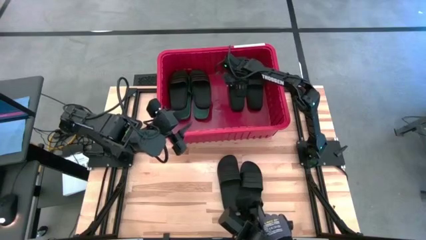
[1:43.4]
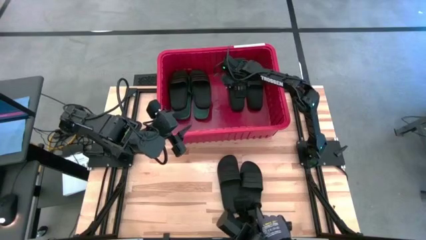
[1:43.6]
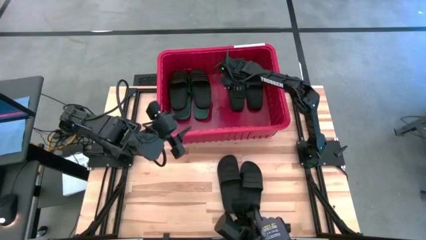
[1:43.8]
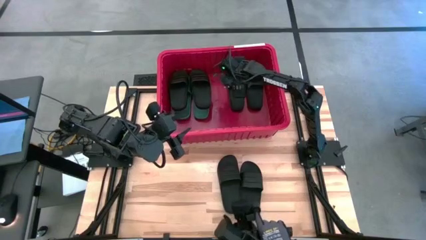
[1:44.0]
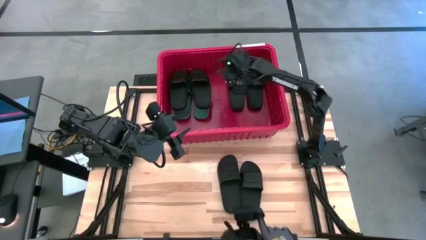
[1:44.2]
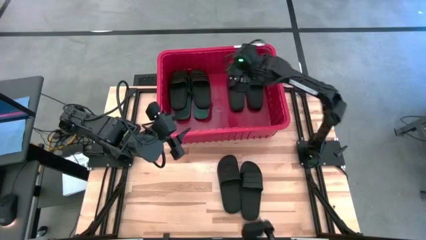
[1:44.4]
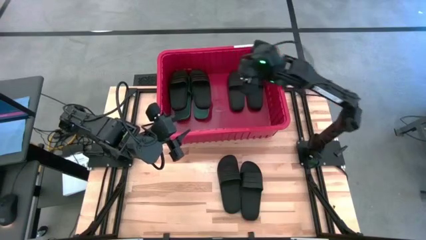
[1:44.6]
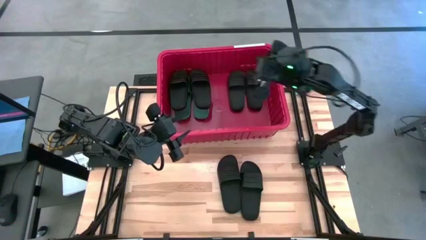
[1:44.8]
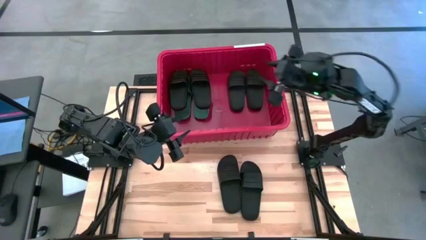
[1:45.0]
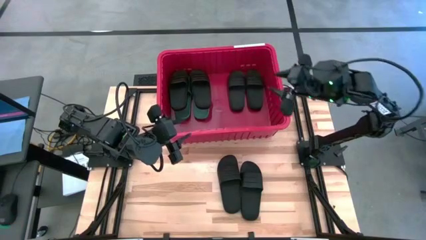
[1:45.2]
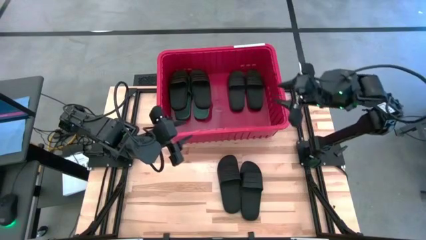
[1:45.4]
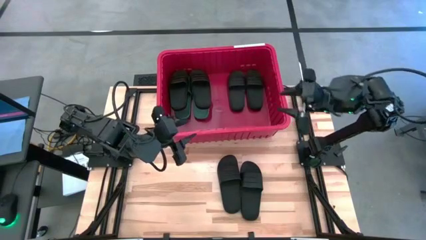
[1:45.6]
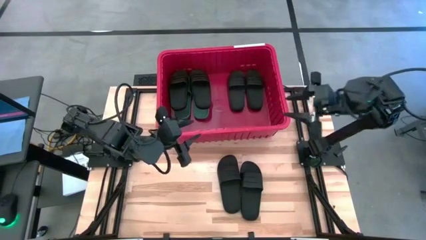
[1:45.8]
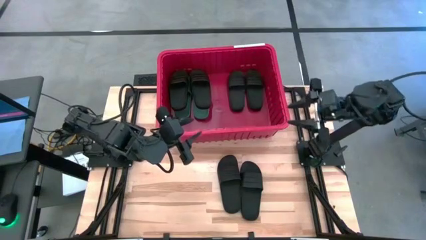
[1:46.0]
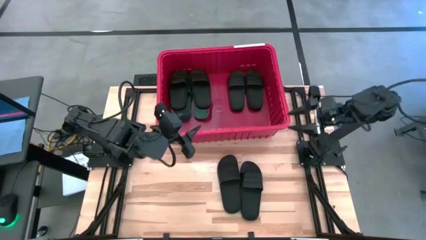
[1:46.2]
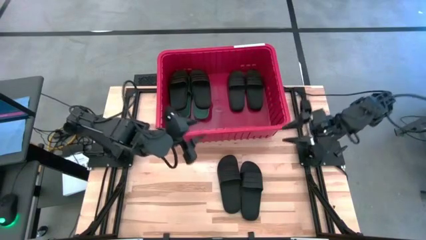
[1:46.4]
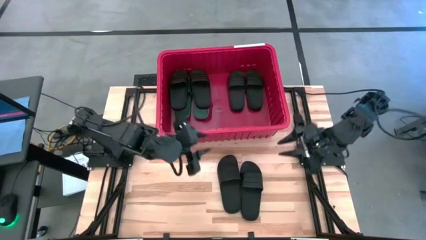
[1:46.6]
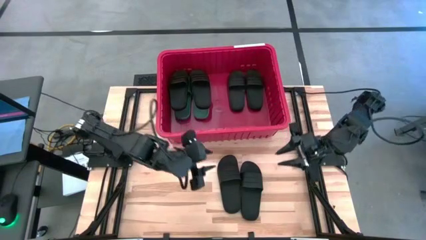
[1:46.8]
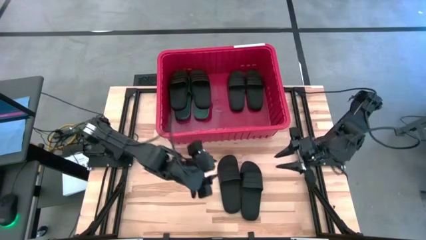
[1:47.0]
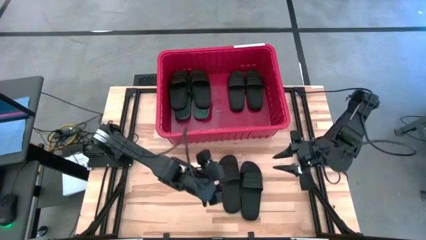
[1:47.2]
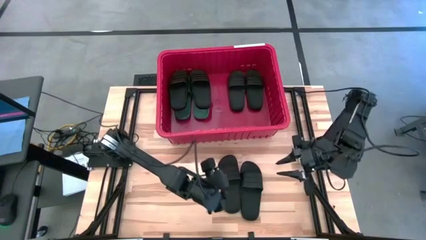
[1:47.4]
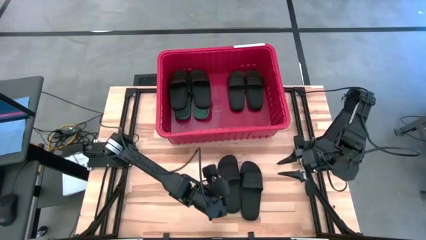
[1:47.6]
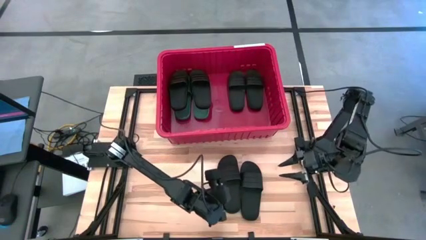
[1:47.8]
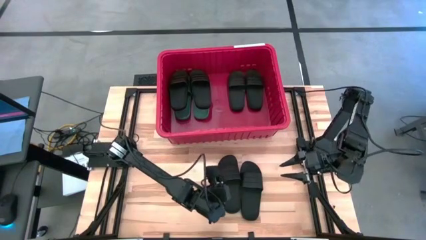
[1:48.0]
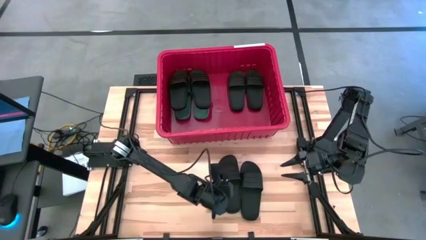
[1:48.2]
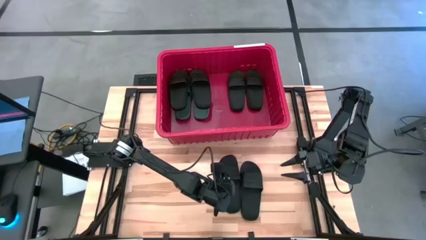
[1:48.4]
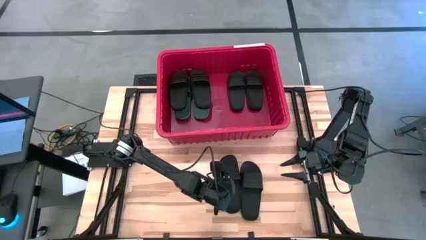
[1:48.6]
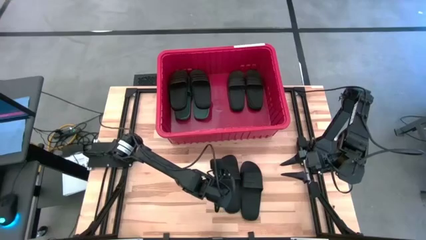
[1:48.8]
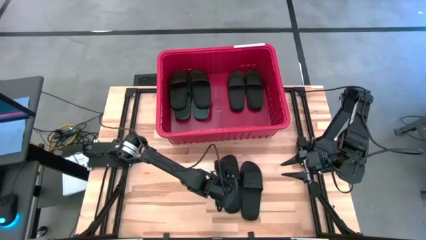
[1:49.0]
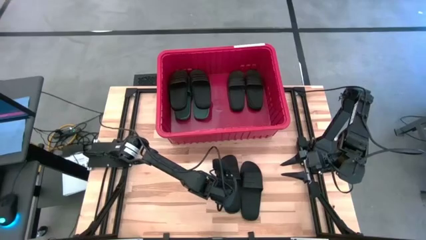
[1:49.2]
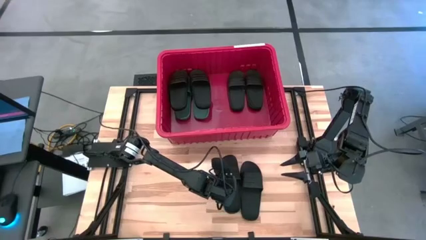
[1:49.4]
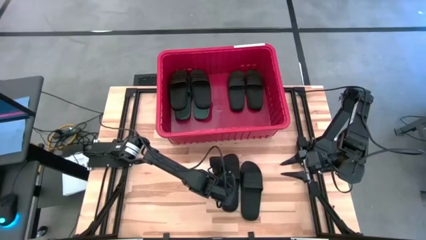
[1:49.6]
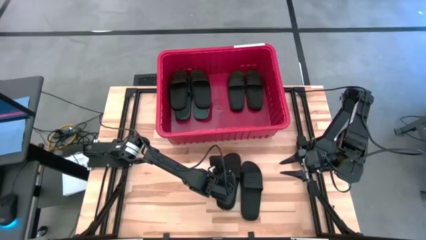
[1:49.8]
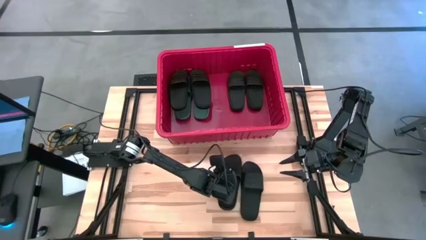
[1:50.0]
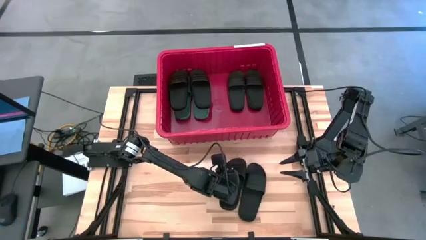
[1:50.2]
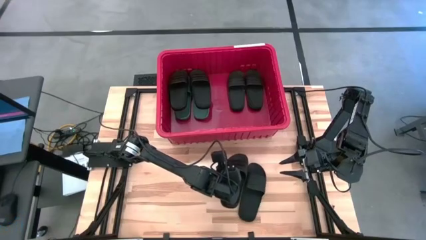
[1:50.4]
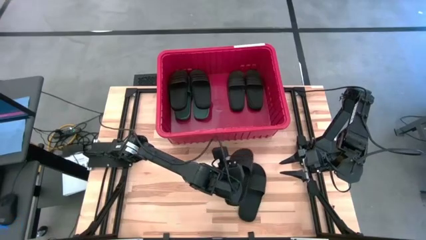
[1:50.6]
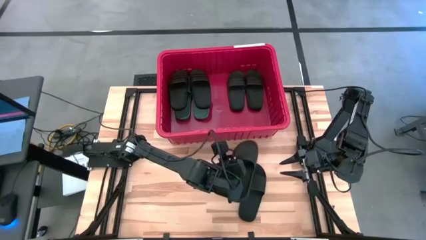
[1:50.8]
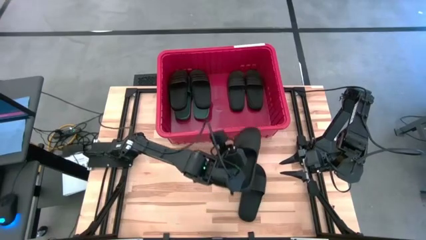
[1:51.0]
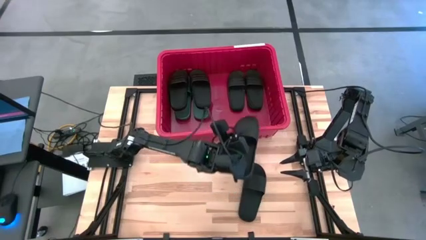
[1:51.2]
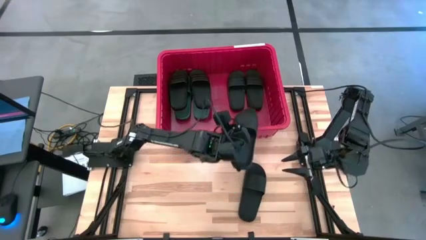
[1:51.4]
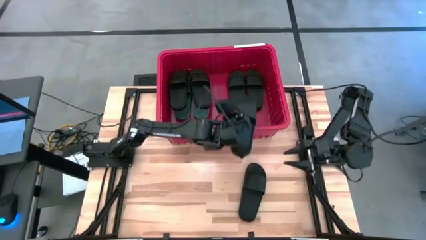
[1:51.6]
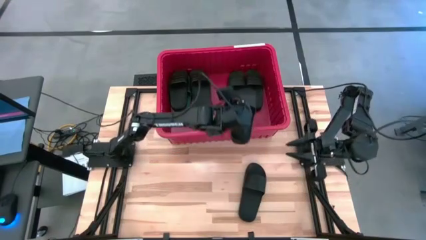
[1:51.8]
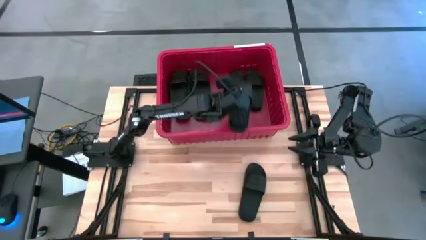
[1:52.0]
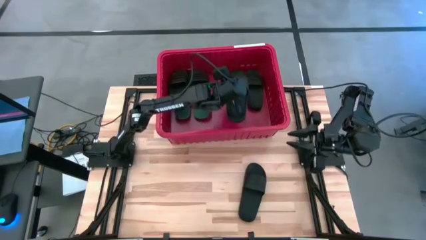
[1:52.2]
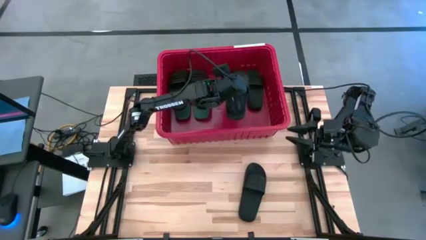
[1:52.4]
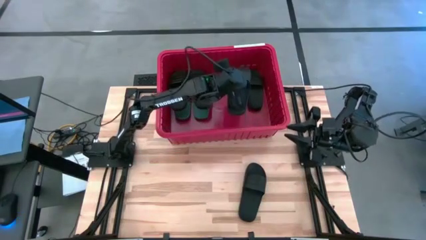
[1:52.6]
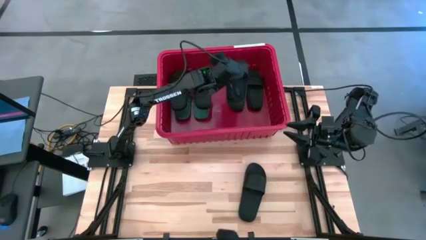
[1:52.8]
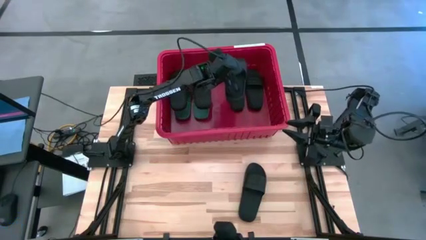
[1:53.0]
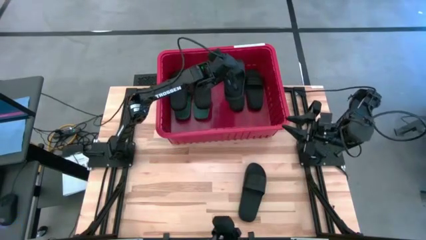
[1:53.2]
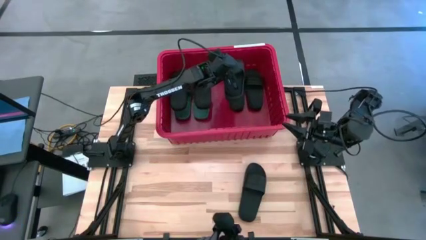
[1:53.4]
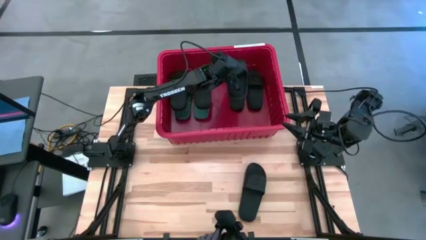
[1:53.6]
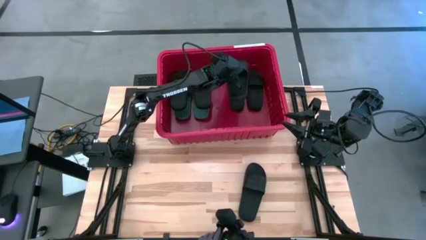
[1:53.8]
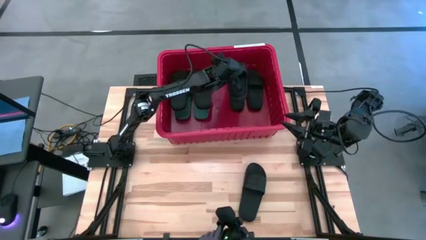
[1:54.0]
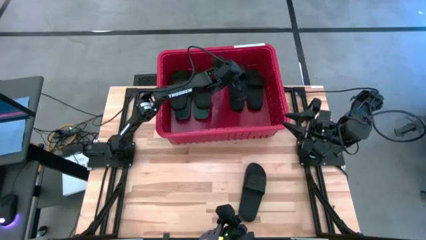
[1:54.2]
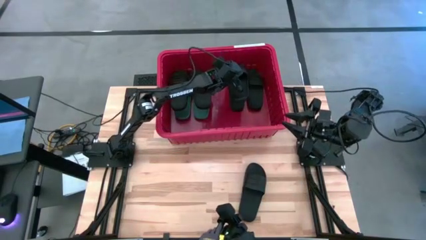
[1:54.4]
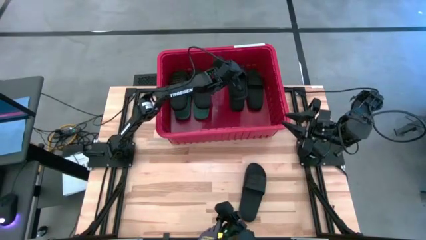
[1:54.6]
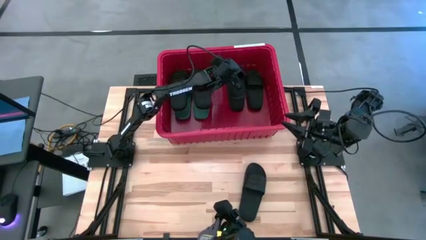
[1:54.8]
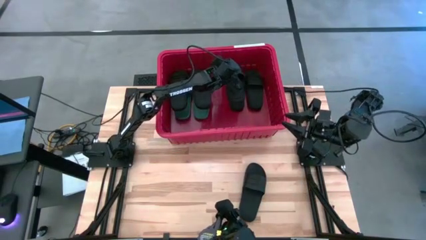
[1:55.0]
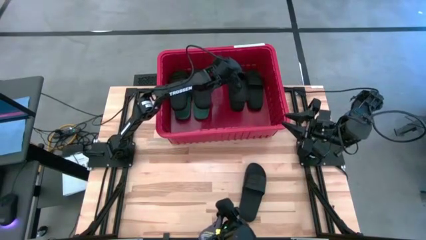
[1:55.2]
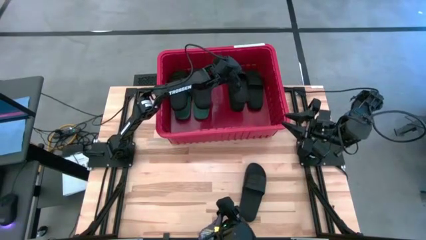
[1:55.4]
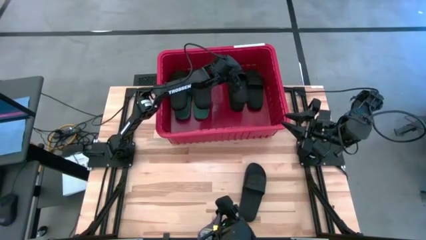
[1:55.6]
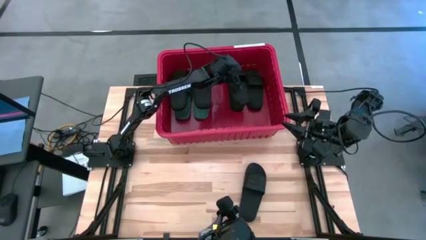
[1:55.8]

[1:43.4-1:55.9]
Task: Pick and place slides into bin
Put the black slide into the red bin

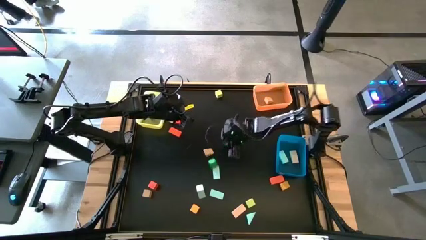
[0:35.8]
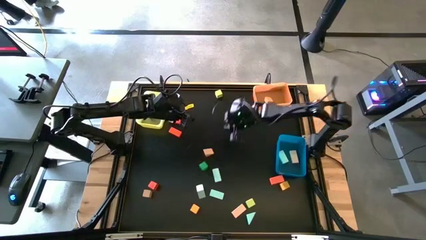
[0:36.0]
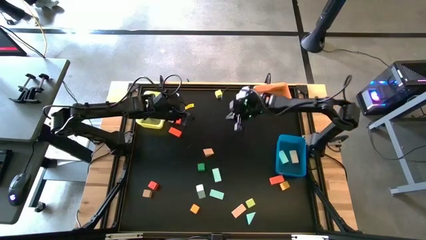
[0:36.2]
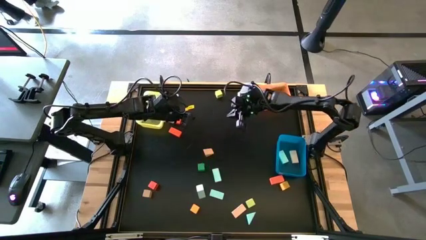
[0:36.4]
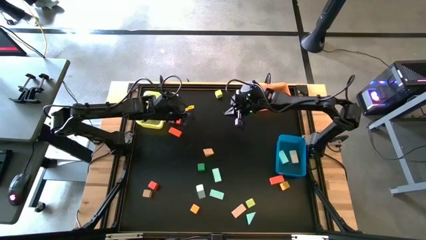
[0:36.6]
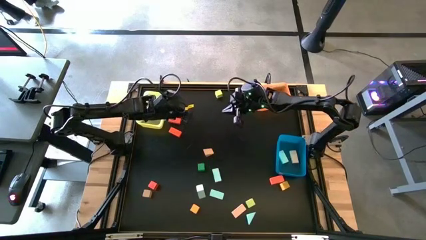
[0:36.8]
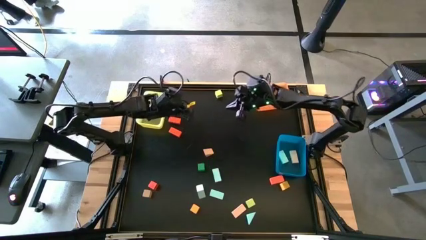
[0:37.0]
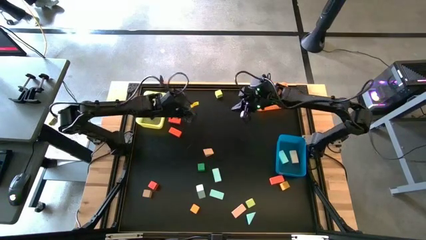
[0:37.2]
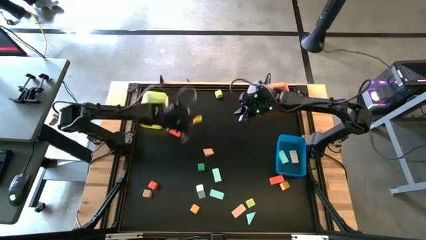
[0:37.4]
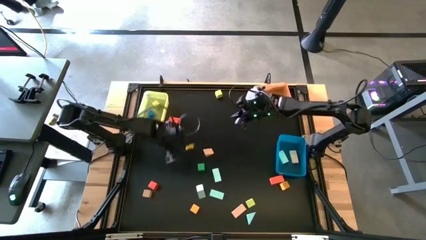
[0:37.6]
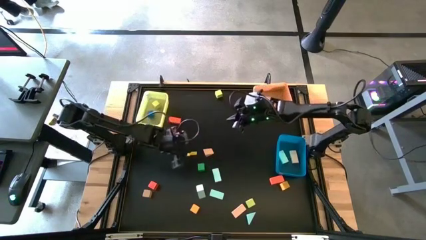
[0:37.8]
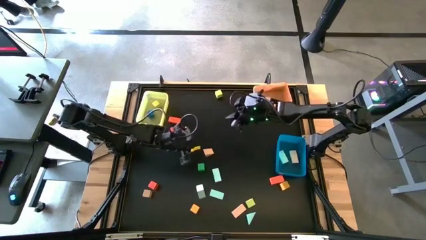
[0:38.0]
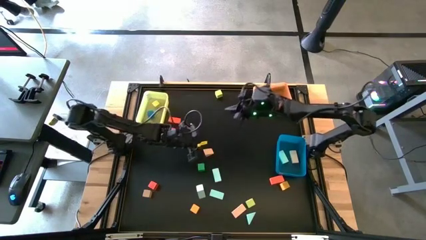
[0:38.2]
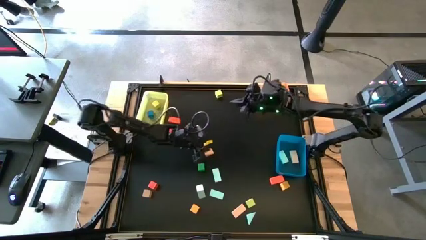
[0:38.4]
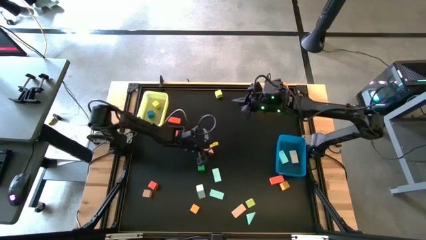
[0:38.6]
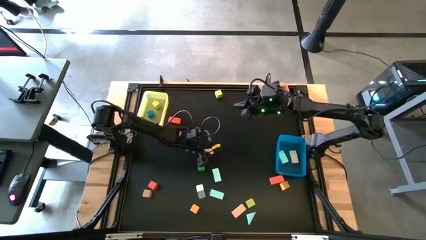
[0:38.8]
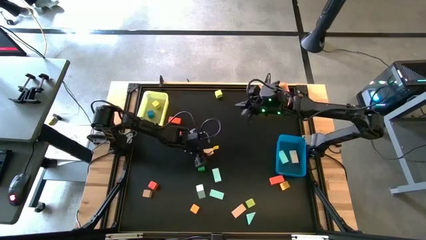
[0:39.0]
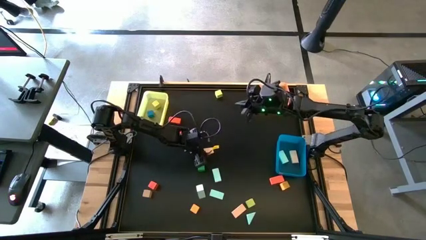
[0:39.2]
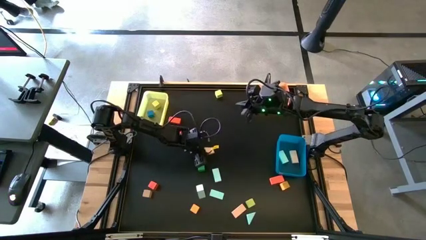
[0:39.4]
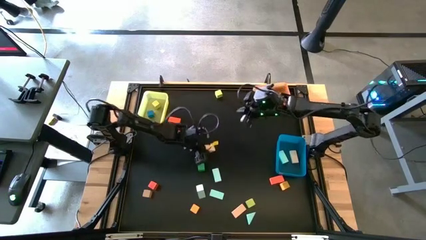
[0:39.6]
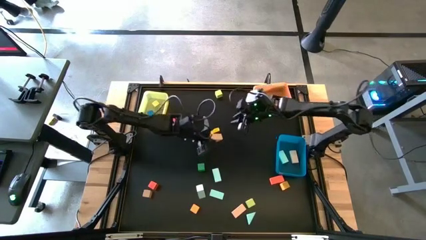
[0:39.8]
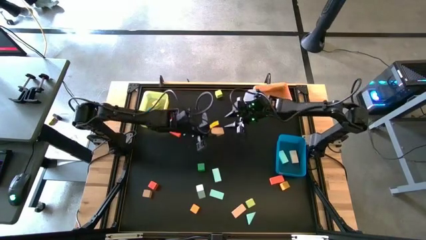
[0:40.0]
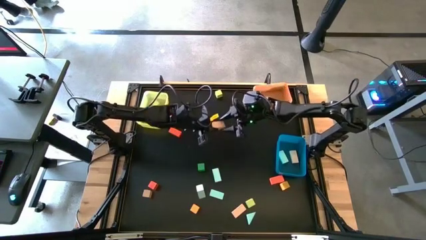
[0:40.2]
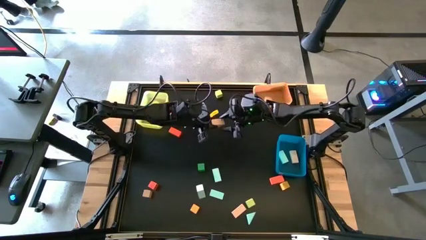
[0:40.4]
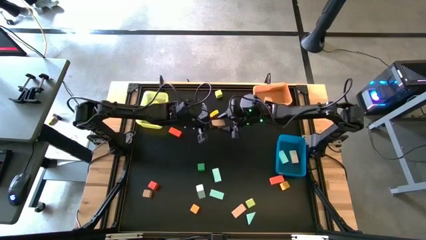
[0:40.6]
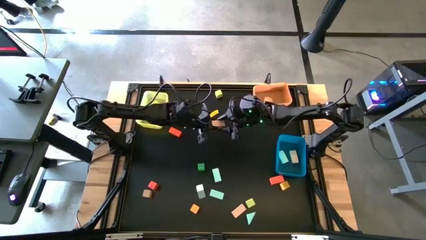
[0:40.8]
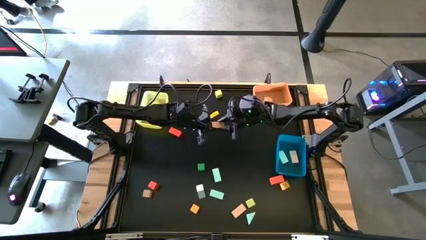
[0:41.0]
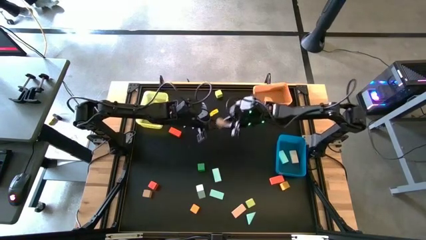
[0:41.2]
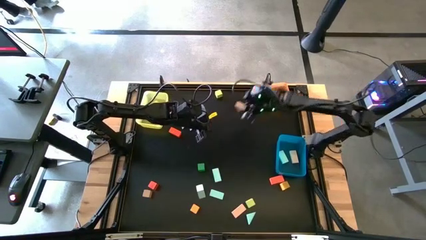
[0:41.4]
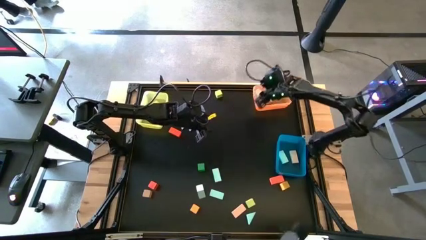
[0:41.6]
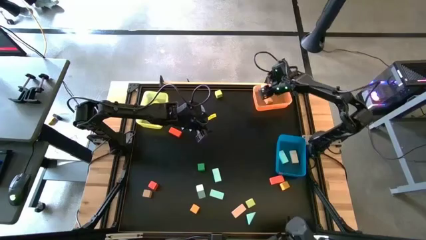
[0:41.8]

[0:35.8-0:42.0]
Task: Sort blocks by size
Put the pink triangle block into the orange bin
